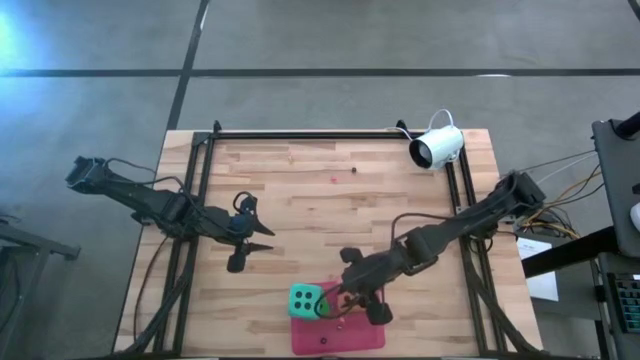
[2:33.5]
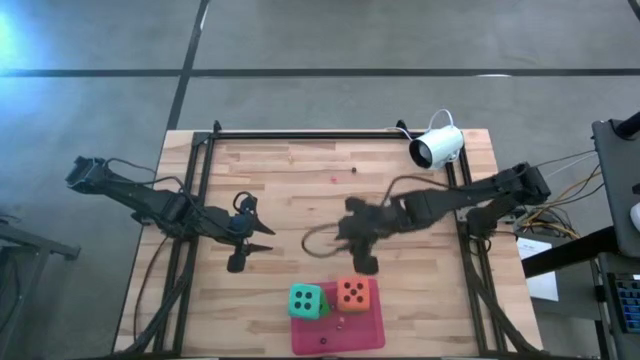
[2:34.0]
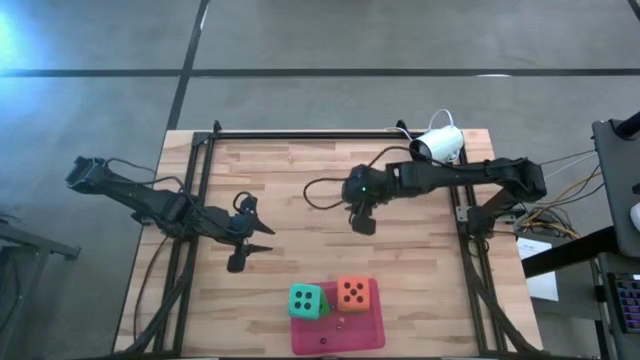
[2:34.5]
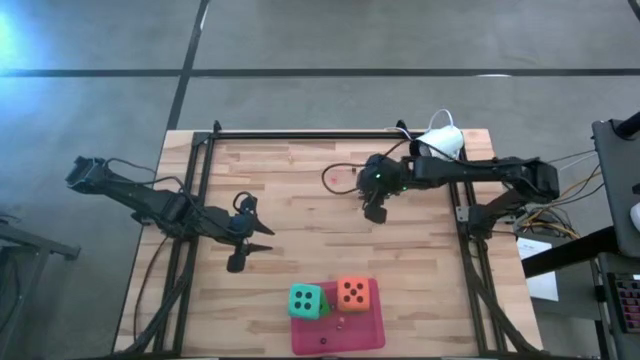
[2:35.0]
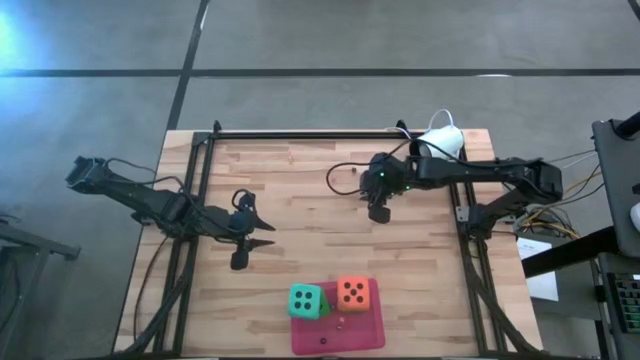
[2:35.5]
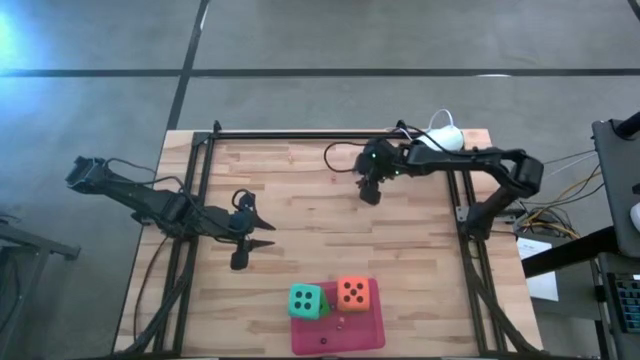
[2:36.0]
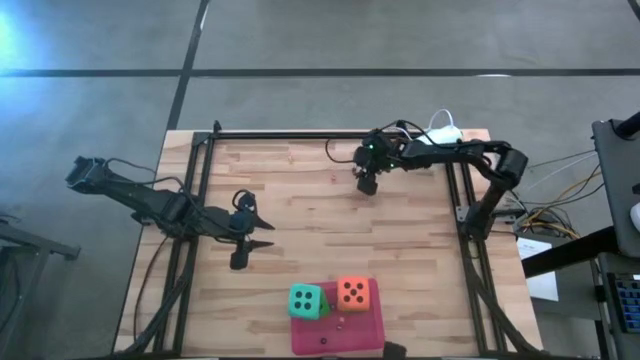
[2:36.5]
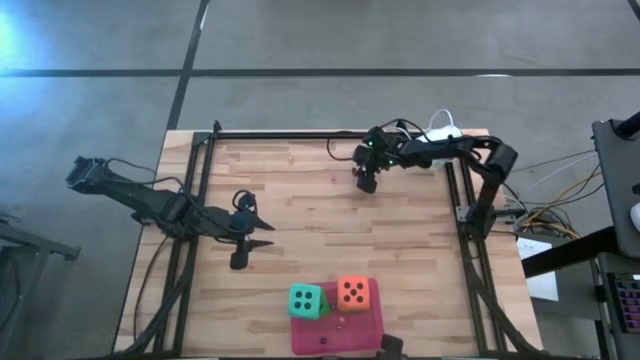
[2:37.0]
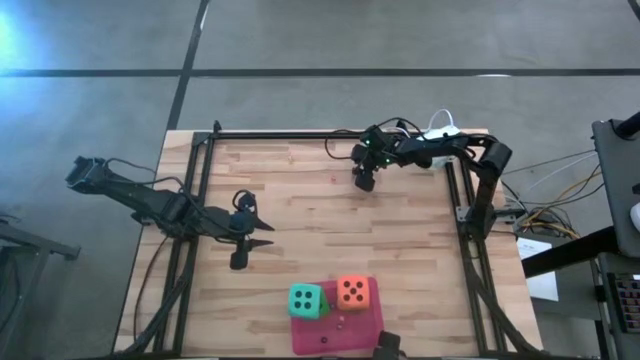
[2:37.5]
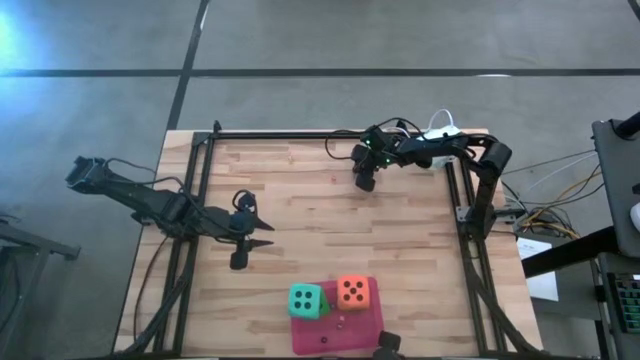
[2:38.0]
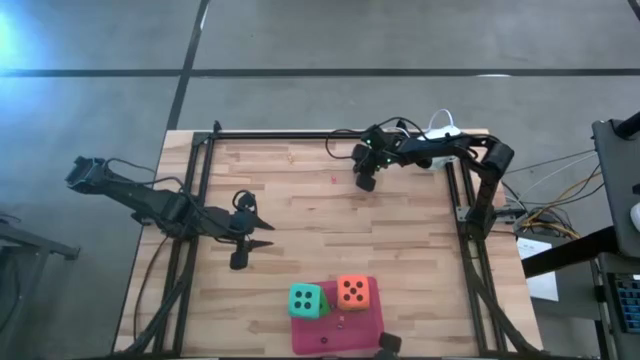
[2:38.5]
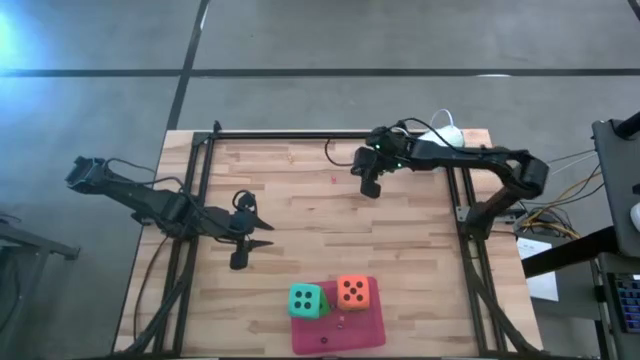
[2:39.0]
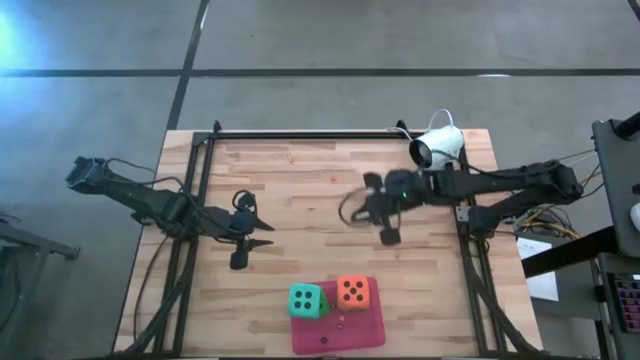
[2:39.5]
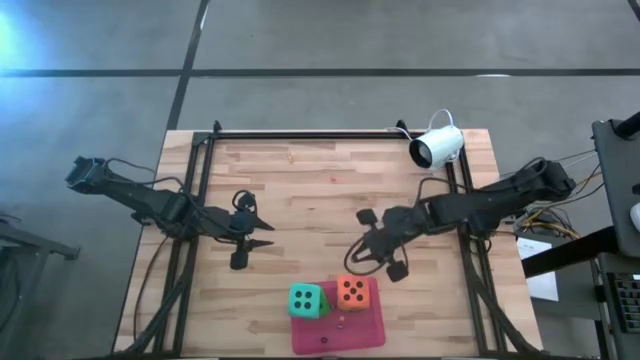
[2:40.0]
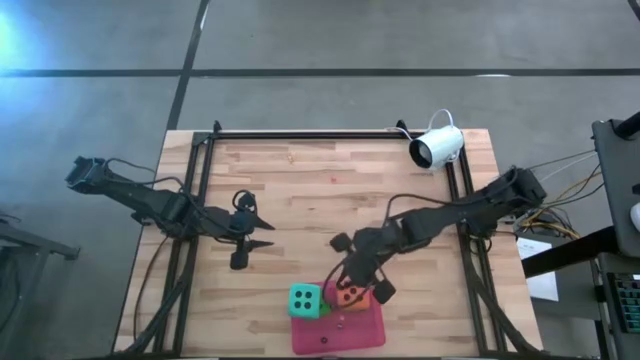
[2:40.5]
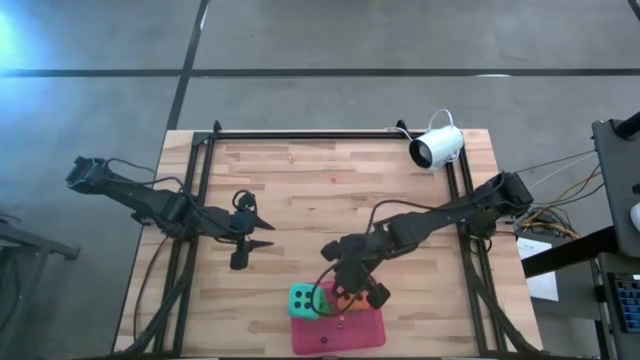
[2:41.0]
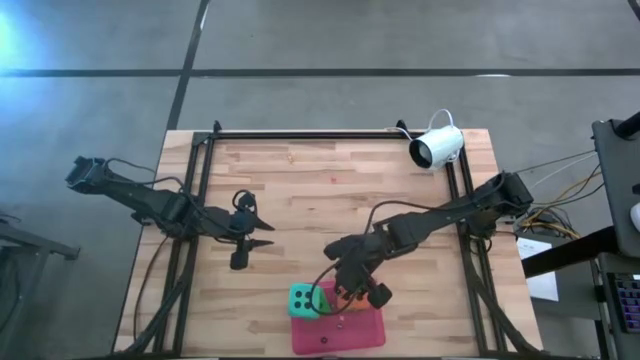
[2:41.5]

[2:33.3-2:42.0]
Task: Pick & Place Dice
Put the black dice into the pink bin

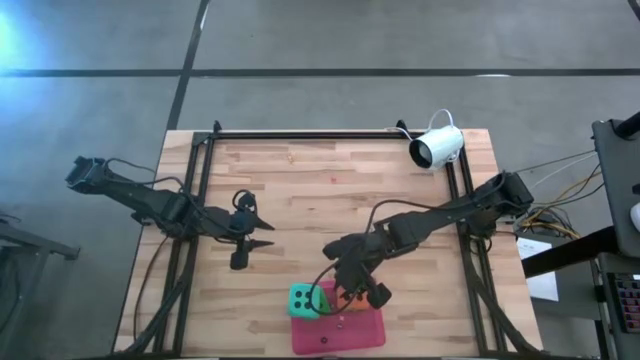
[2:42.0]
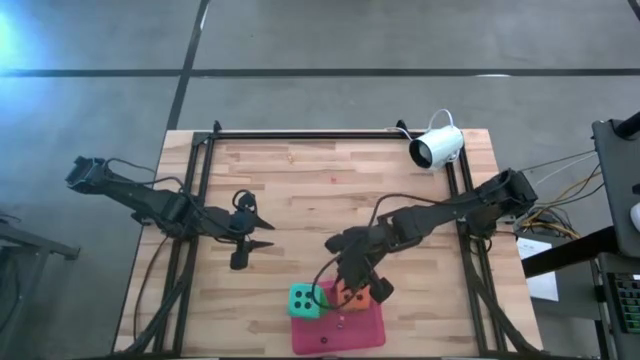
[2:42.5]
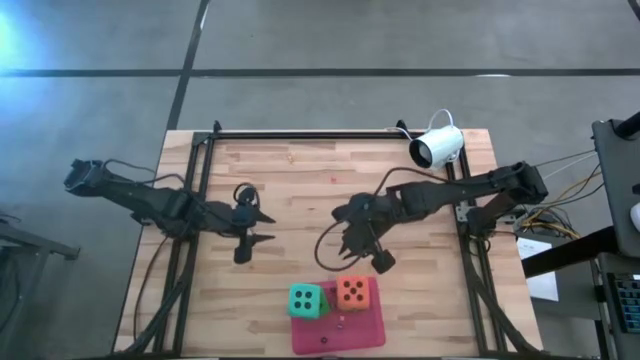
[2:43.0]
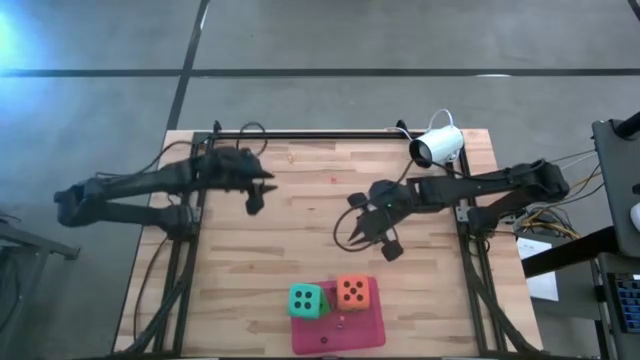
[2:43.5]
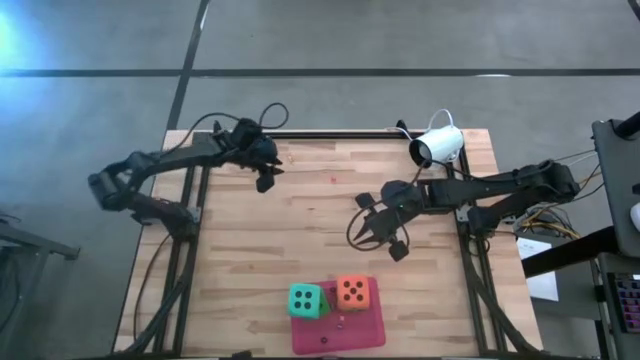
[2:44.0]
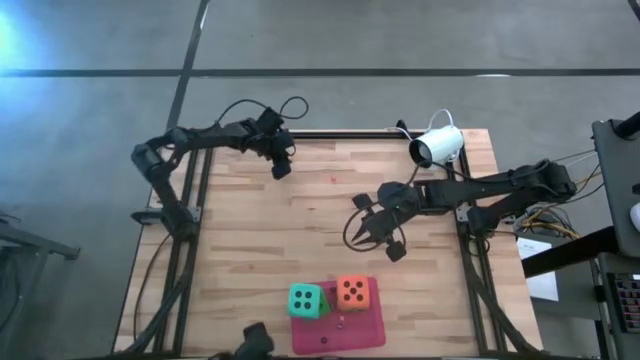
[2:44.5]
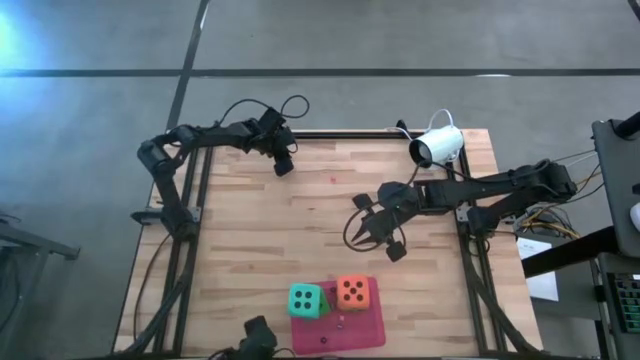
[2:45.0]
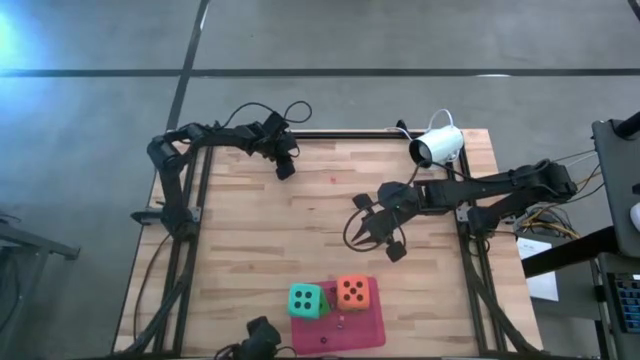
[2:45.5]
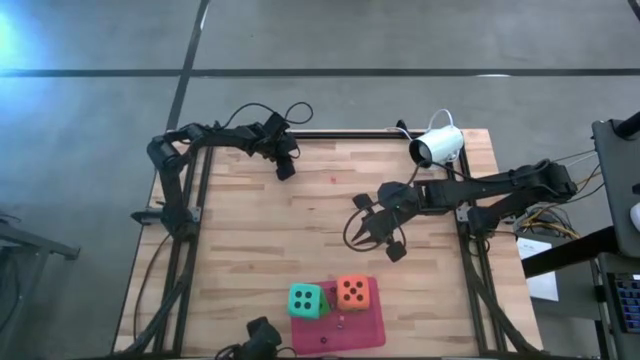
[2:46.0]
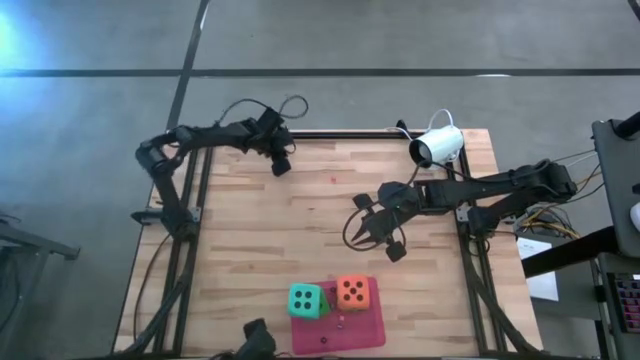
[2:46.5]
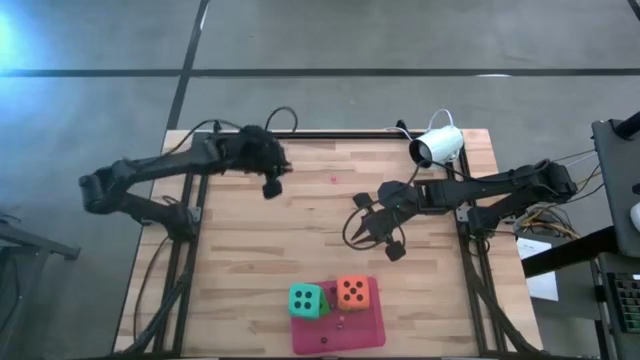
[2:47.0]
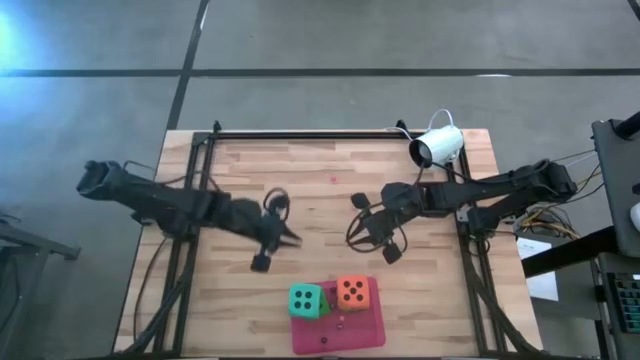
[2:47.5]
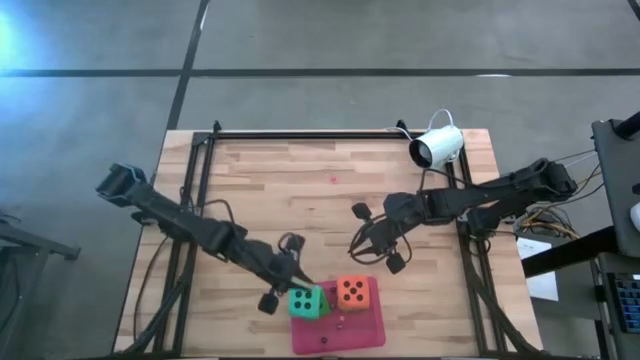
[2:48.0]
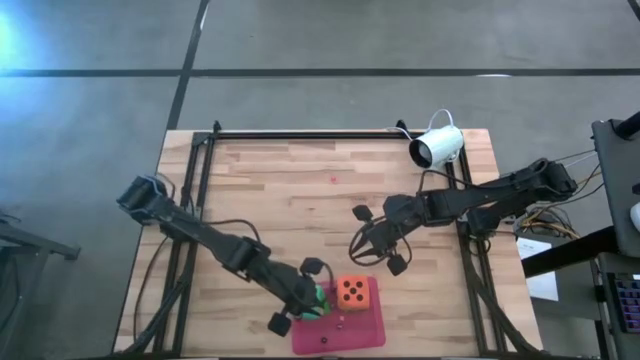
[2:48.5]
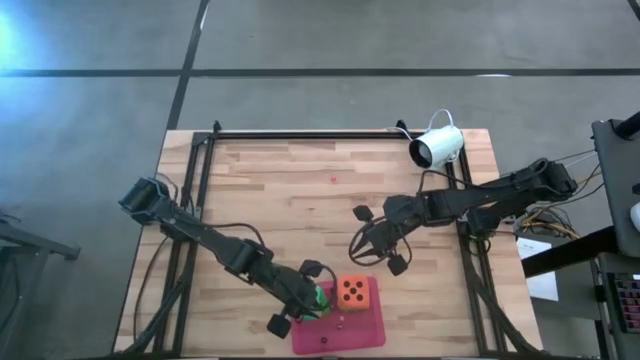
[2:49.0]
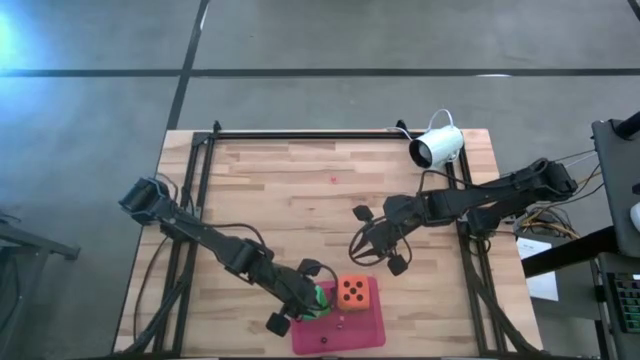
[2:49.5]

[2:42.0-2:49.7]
Put the yellow dice into the pink bin

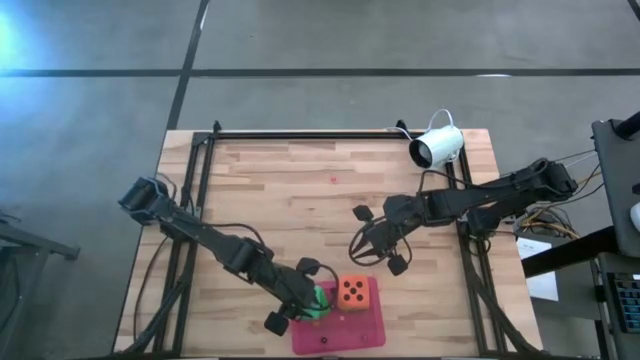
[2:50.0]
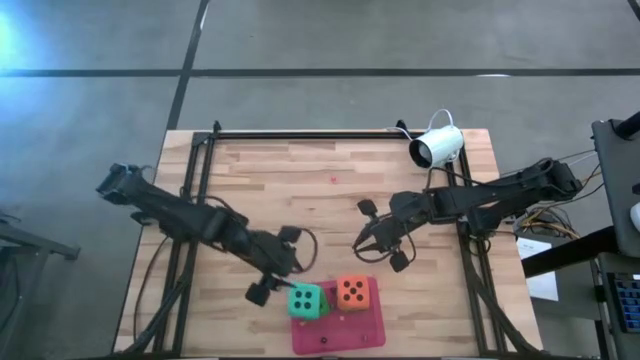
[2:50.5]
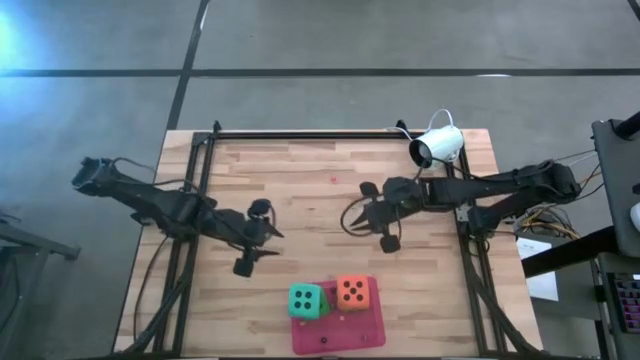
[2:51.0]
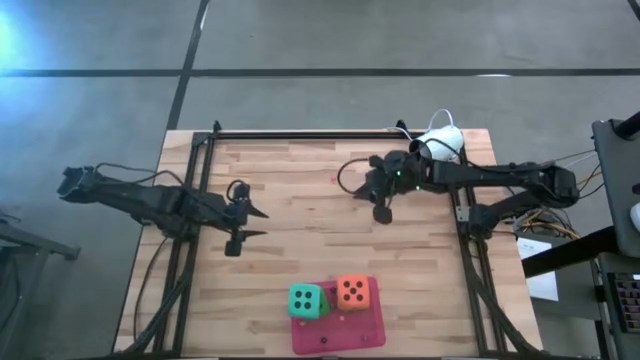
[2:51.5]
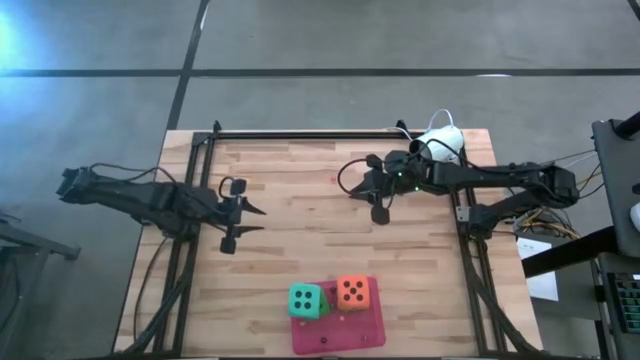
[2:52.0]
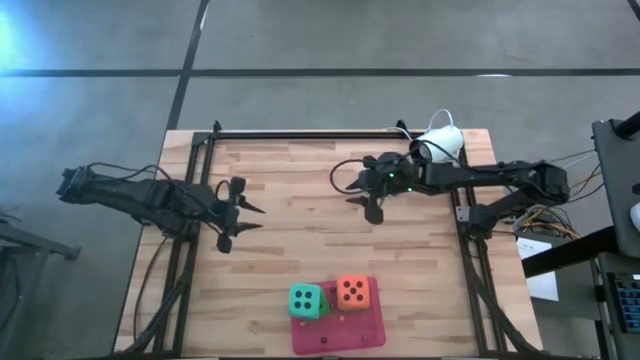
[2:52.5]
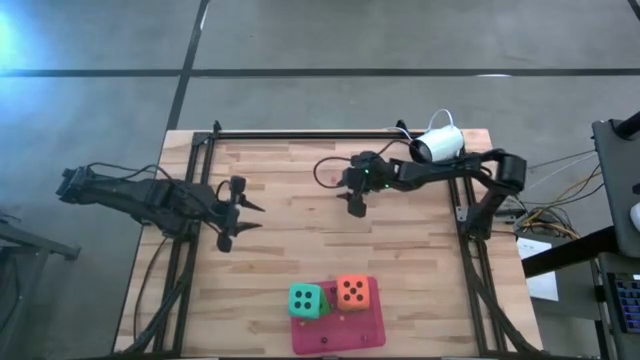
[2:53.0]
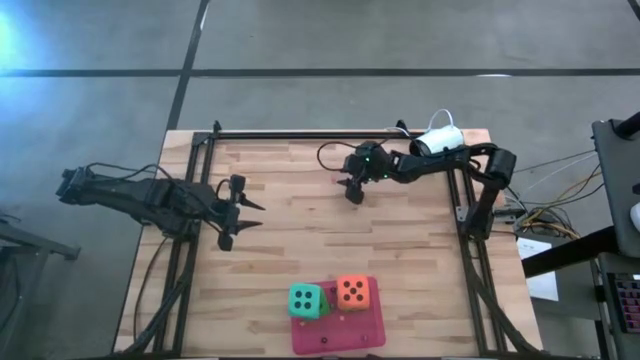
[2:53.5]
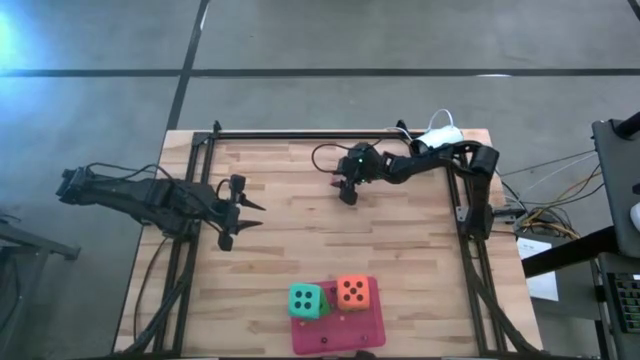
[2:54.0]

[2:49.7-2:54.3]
Put the pink dice into the pink bin
